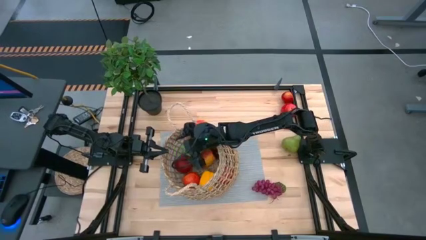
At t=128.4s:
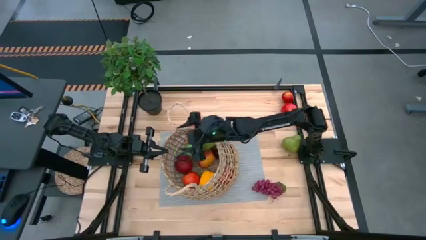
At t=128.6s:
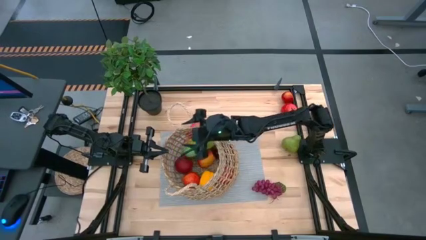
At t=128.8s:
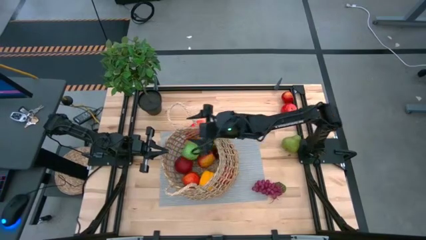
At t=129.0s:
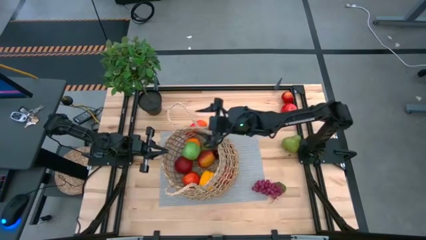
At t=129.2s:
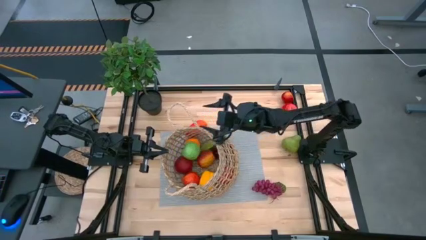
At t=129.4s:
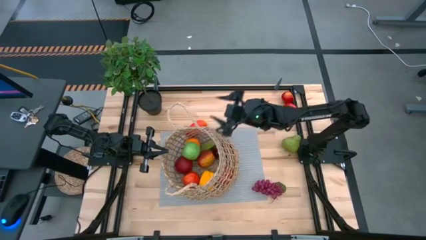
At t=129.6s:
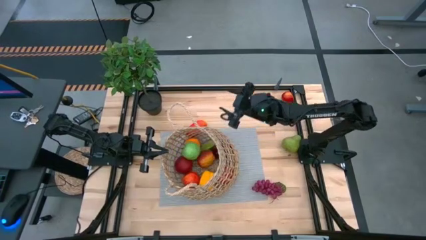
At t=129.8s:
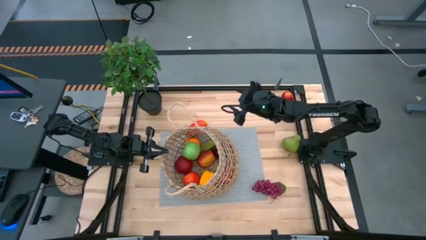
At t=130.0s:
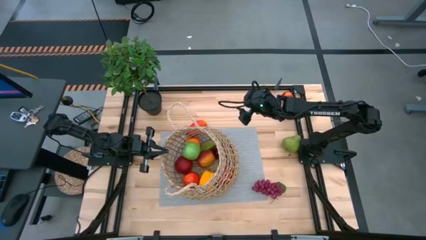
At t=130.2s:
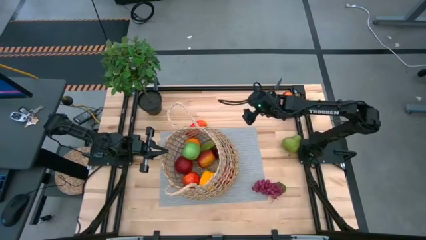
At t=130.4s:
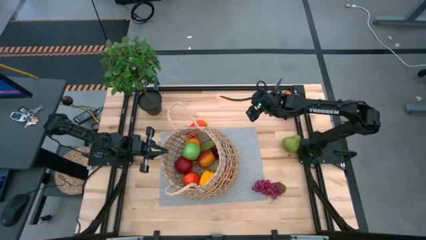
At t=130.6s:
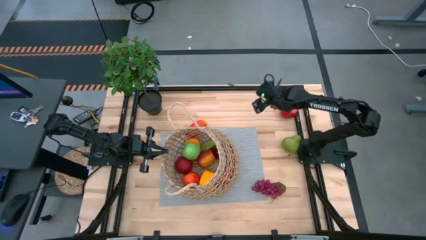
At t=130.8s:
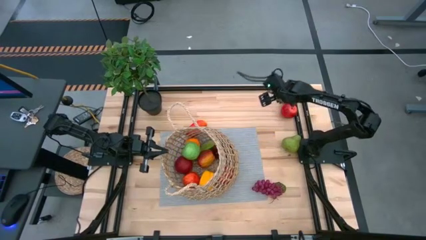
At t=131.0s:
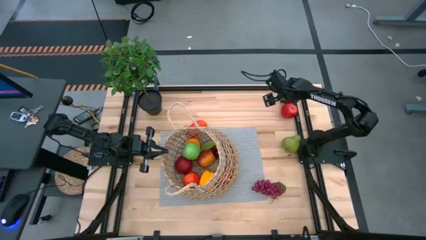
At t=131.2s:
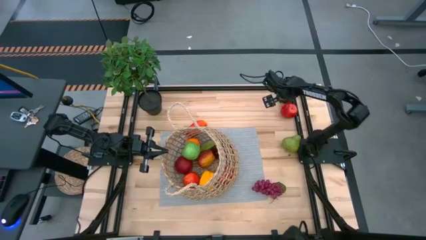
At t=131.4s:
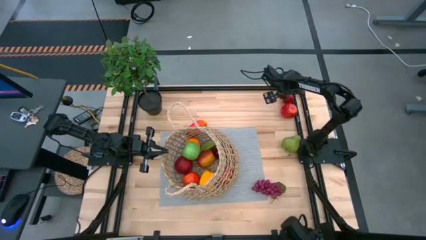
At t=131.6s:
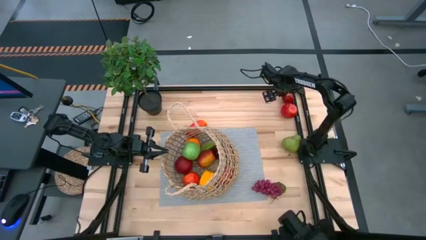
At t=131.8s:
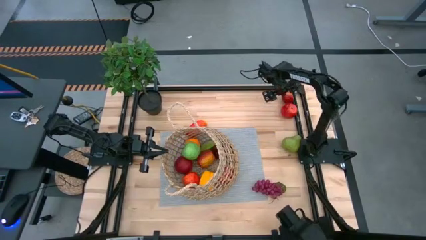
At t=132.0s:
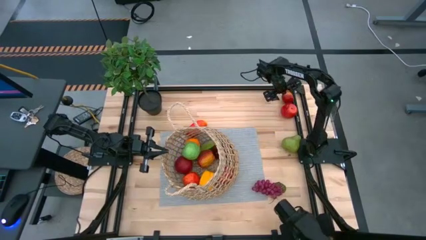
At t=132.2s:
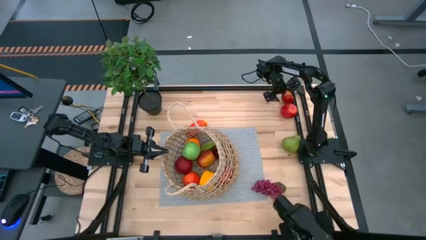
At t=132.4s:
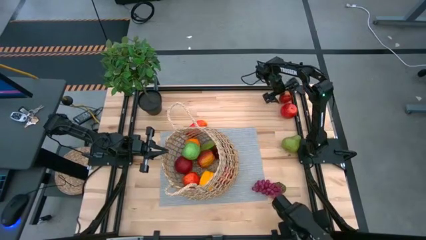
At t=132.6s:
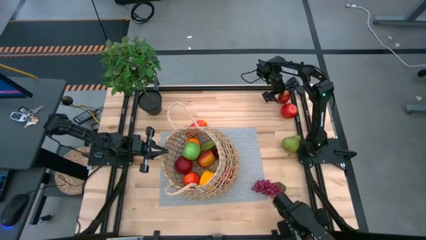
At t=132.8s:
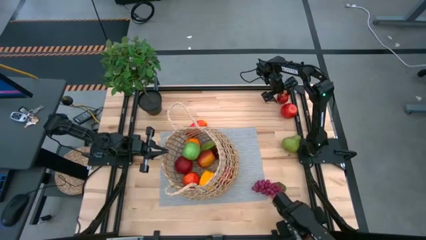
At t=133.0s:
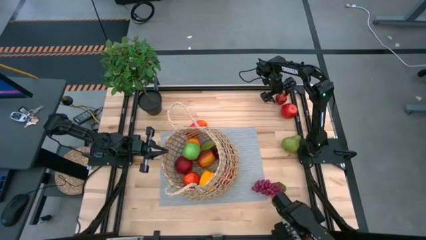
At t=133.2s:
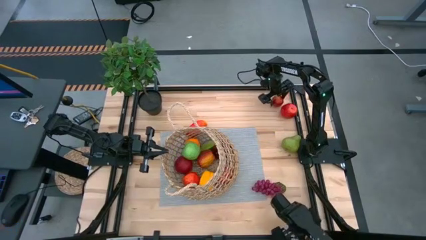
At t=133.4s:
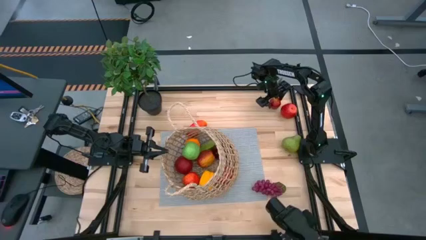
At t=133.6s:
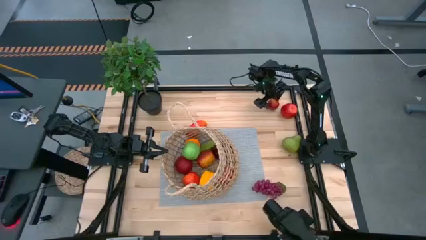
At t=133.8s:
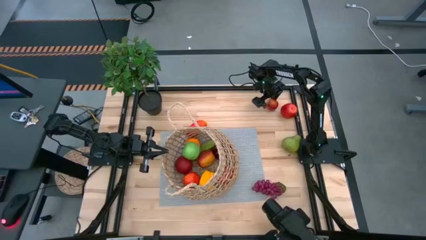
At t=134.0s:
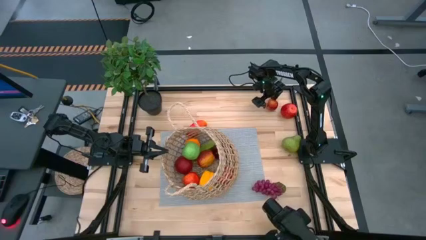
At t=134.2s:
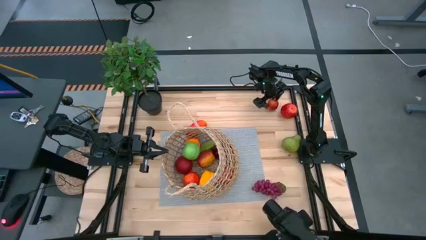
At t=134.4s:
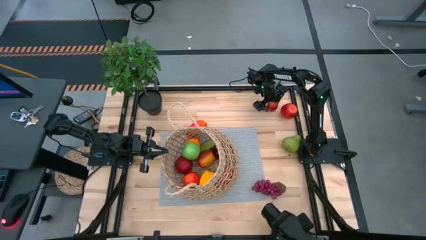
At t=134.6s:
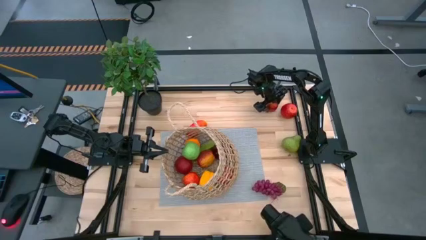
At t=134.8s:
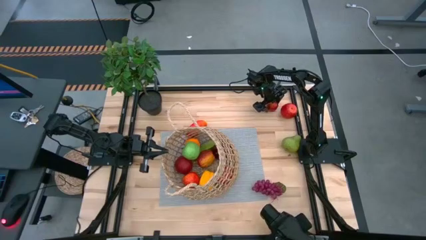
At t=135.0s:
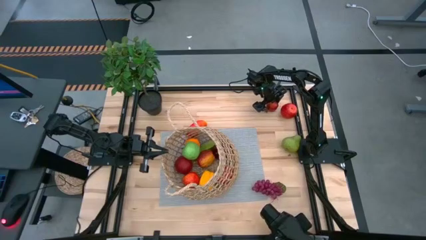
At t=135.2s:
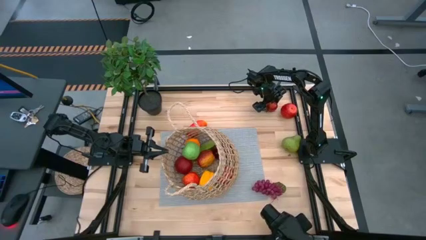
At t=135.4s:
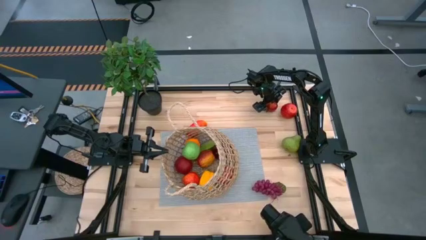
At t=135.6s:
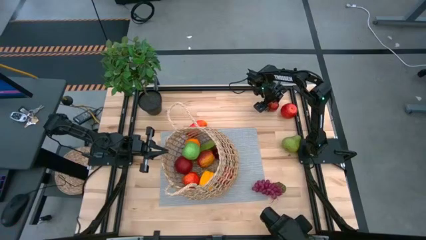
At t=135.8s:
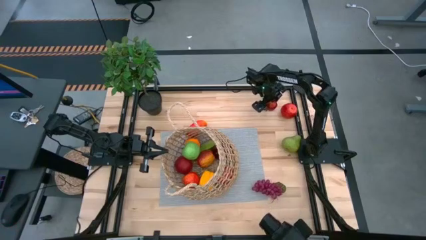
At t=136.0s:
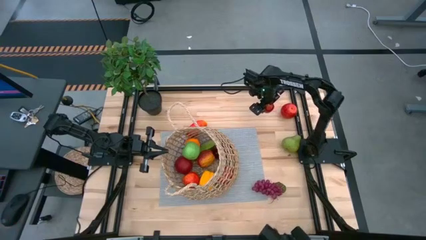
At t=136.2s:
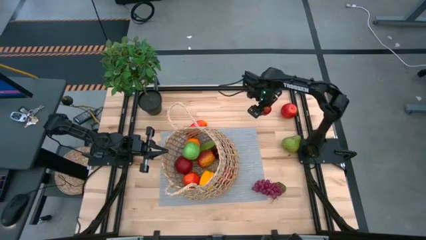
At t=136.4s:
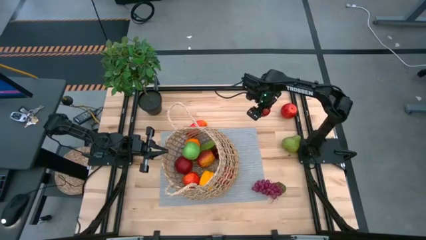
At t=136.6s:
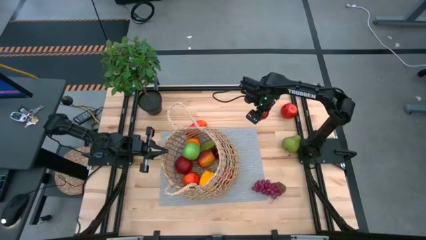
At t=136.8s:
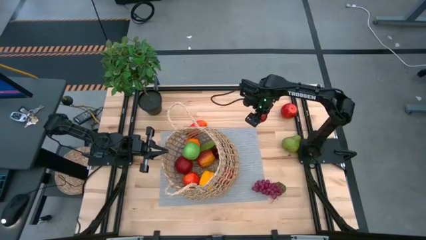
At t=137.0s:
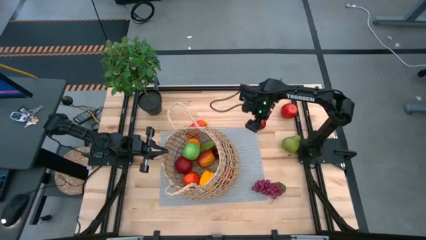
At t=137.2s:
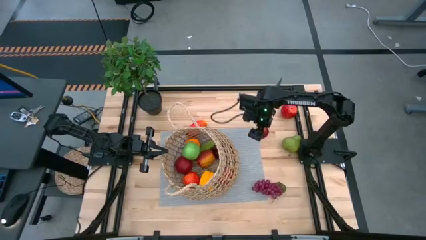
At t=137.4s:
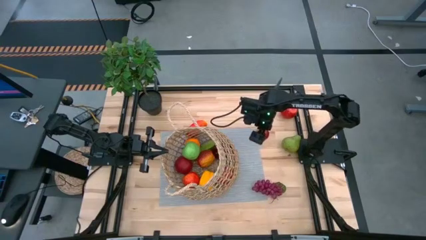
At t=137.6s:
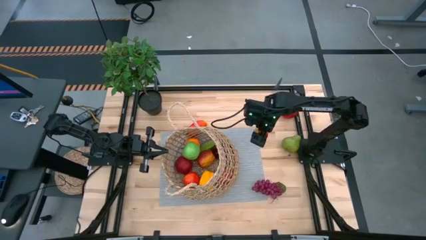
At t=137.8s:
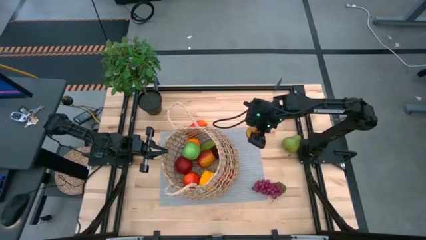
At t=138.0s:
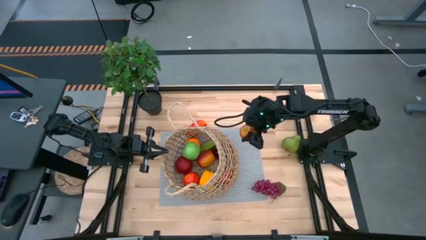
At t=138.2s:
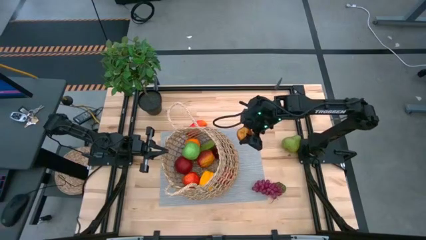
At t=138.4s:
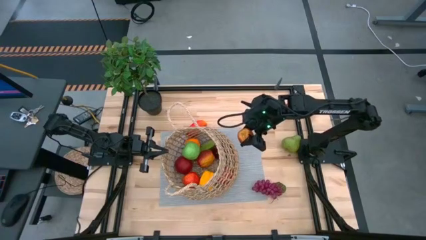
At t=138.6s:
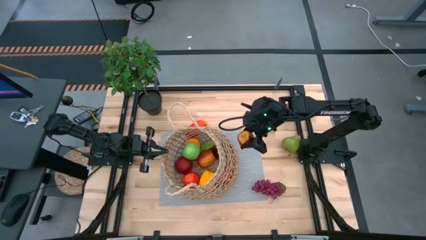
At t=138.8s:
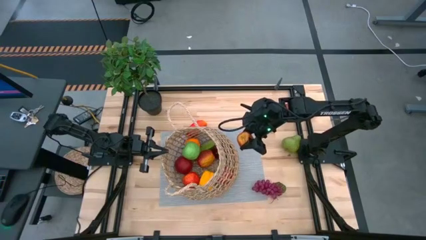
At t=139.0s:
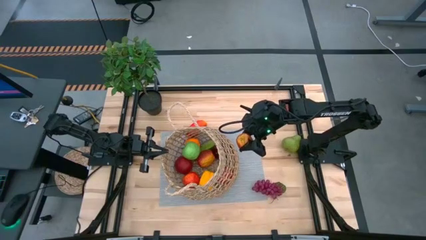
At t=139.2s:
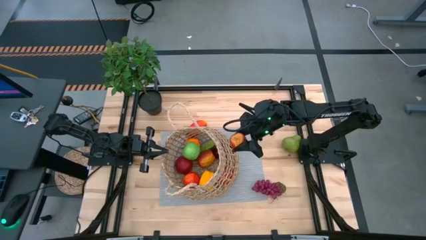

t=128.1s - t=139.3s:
Task: Build produce basket
Put the red apple into the brown woven basket
